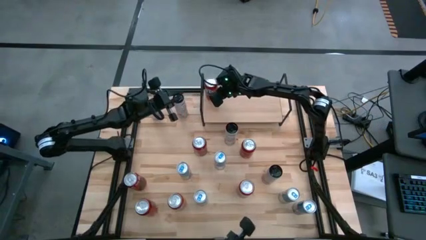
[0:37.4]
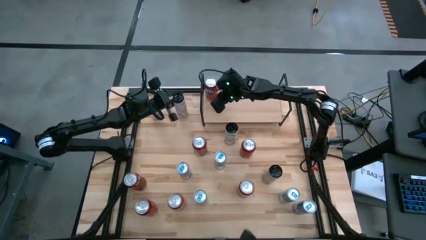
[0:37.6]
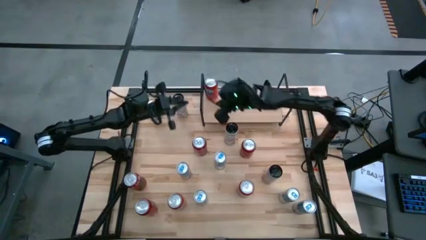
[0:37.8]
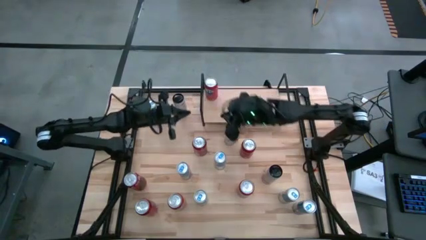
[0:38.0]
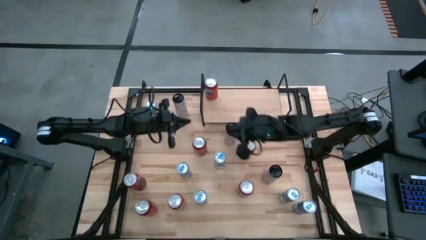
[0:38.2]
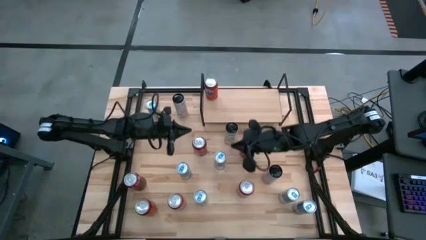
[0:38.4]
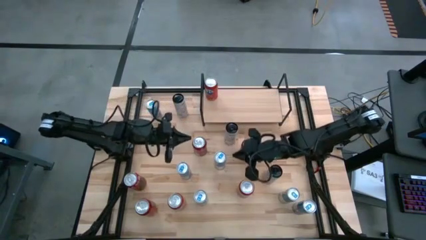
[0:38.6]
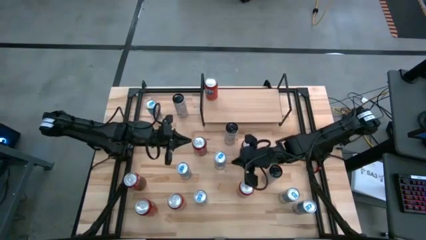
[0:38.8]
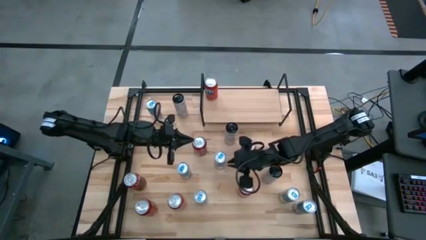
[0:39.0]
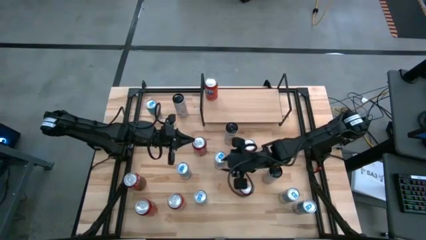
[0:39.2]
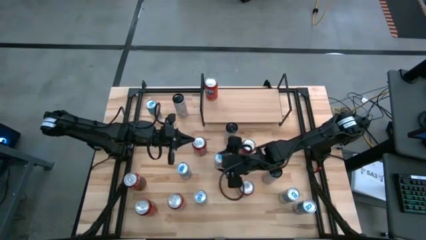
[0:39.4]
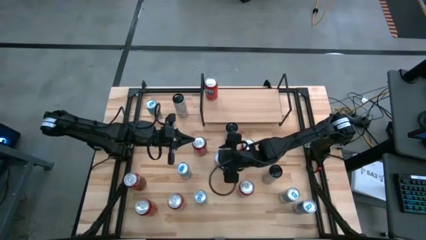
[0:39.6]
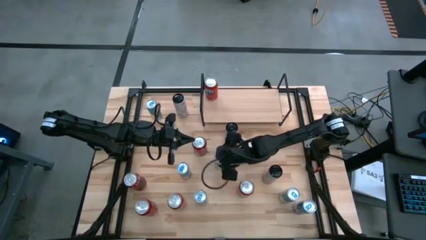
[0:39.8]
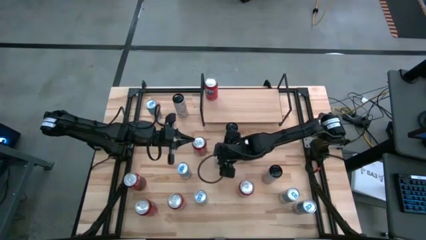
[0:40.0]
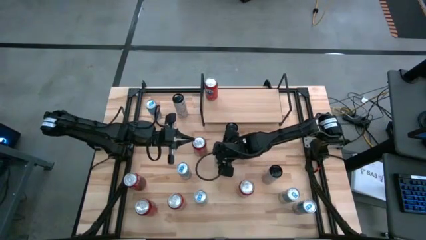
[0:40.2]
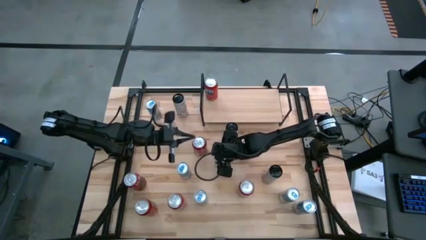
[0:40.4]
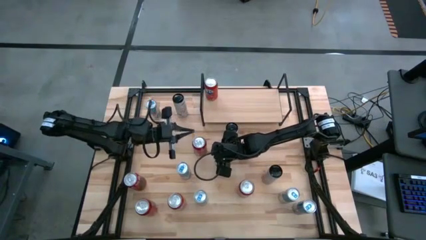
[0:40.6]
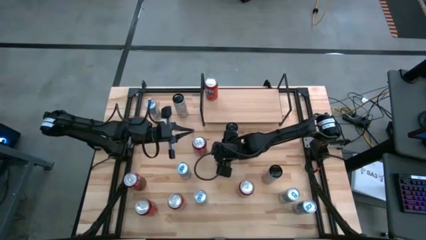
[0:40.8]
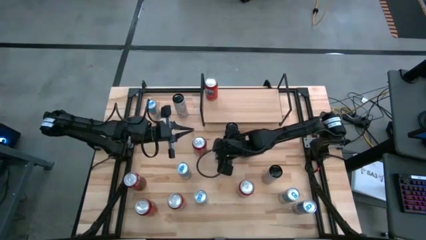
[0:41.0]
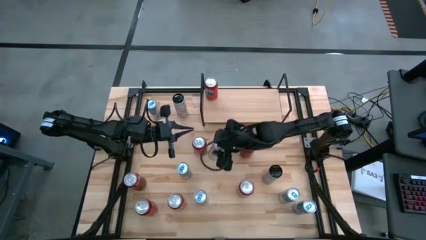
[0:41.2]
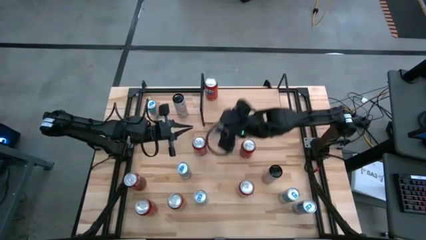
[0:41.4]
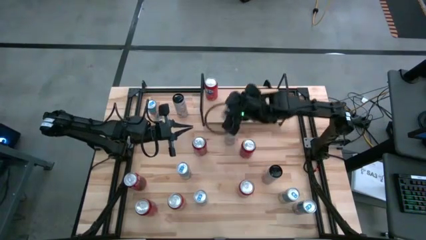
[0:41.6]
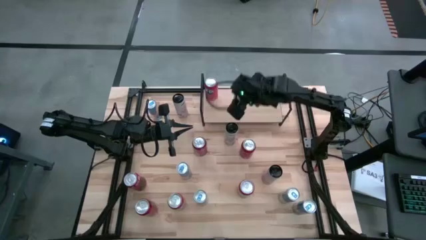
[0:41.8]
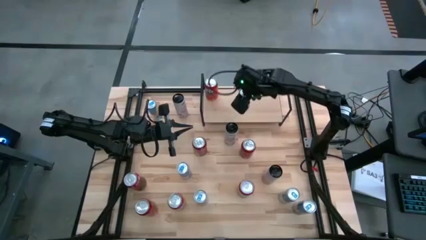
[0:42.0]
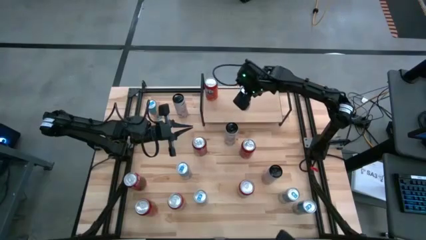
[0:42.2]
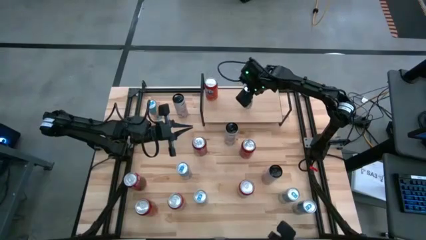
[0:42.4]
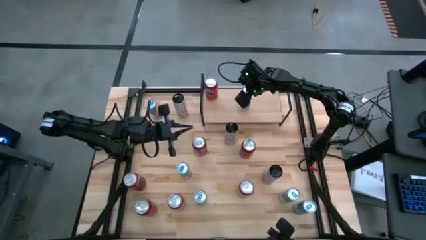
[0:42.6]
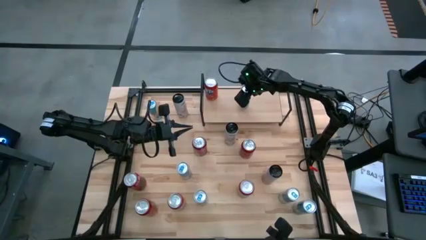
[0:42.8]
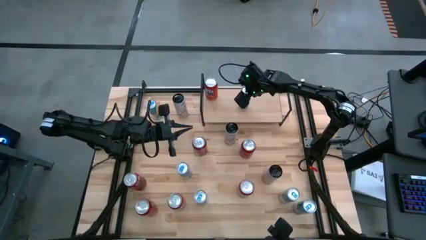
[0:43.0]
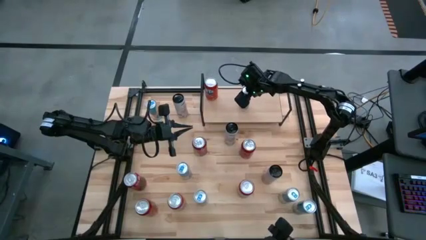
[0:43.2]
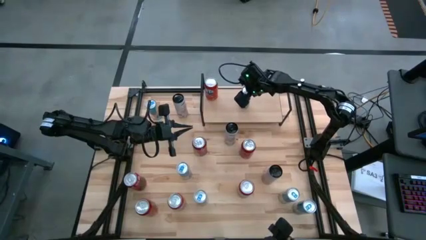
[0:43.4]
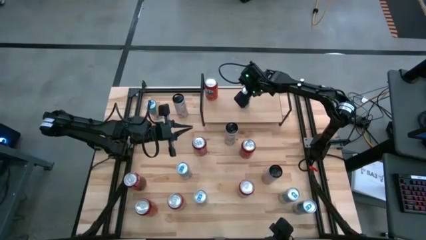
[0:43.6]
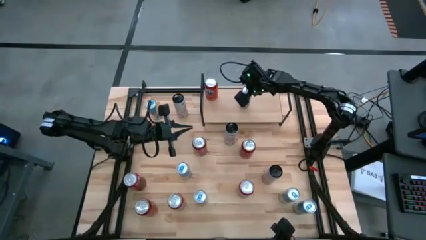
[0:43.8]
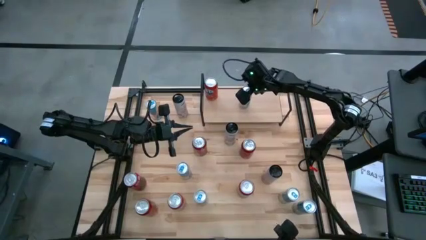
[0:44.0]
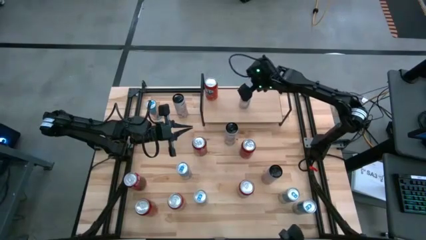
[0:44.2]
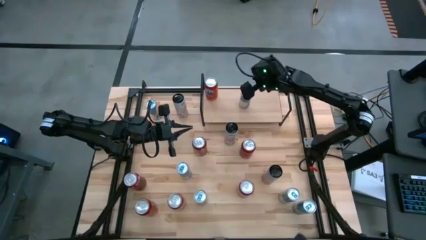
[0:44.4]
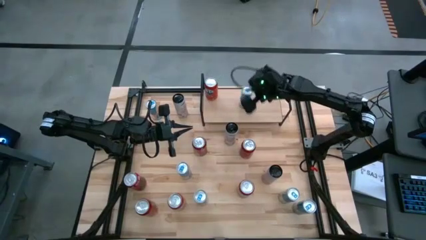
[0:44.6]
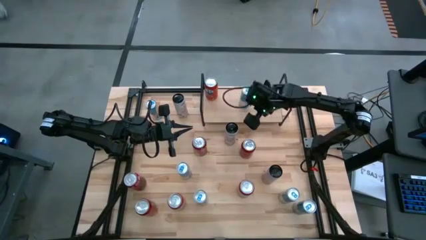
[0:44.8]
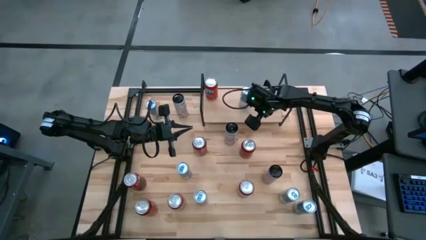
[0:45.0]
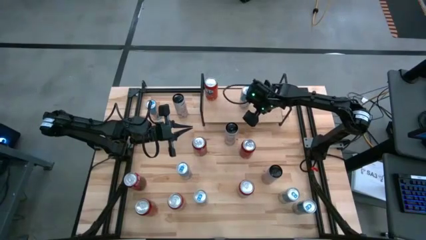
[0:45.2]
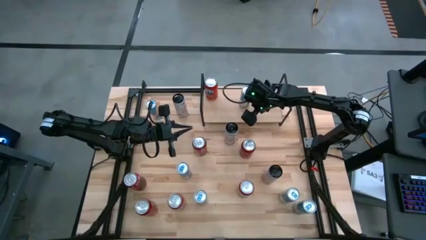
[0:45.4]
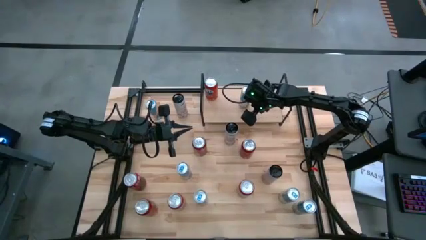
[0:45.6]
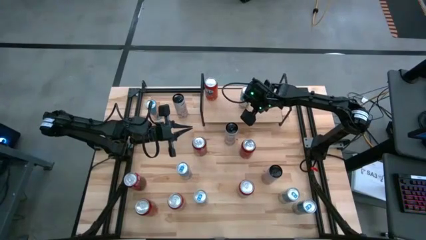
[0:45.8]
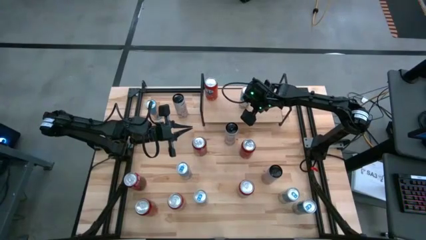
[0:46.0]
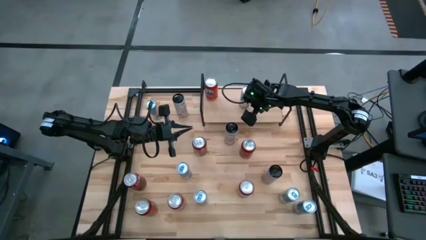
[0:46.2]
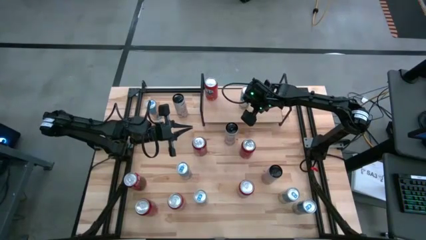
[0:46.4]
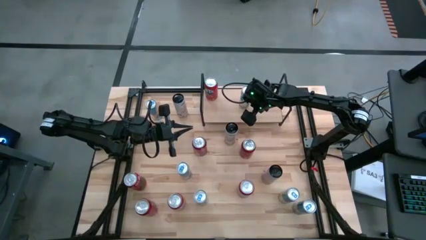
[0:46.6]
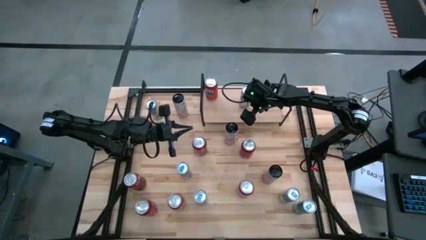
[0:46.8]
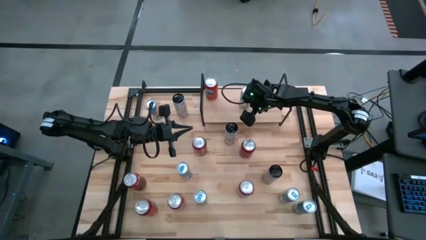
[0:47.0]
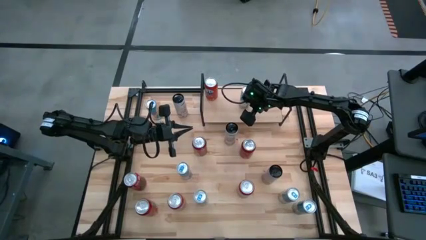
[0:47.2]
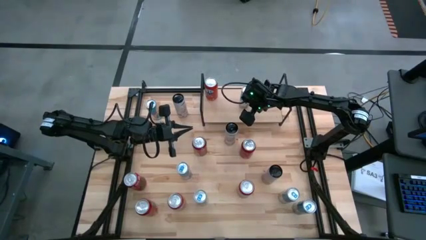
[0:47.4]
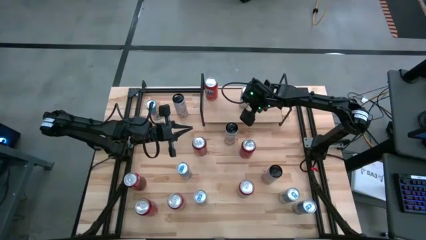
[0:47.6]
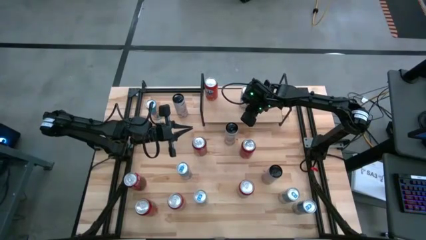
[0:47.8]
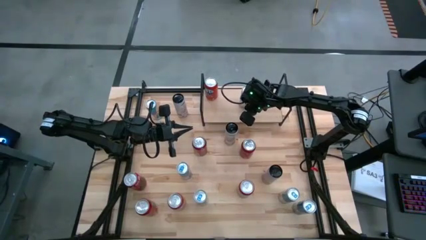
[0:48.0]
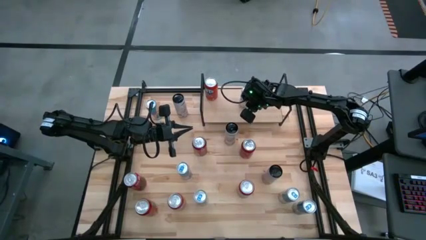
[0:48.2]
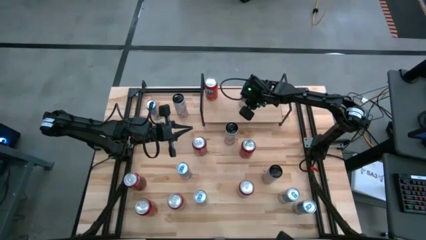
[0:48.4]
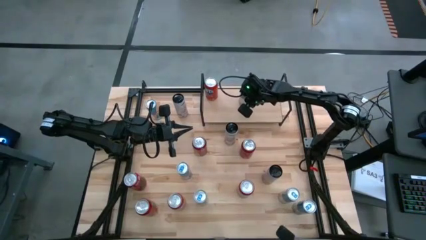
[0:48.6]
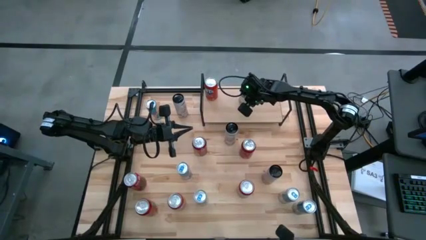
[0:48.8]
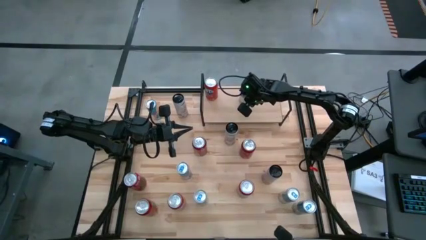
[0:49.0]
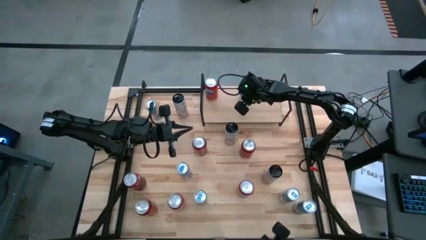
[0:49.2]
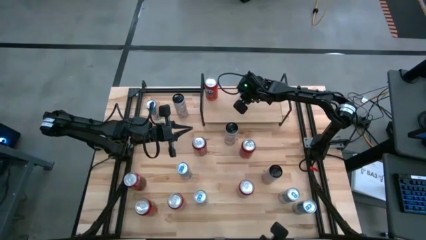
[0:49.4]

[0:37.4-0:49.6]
Task: Place canned beverage on shelf
Put the blue soda can on the shelf

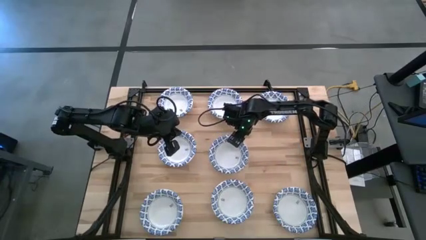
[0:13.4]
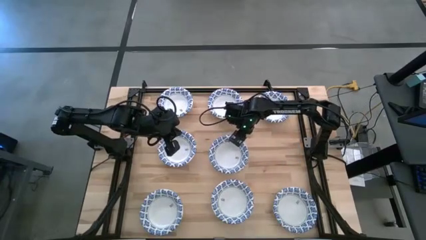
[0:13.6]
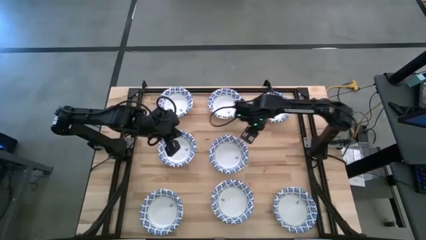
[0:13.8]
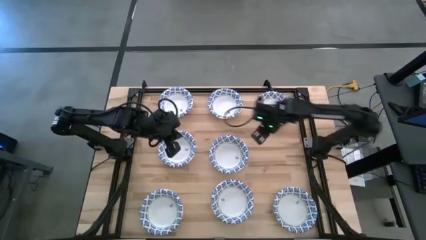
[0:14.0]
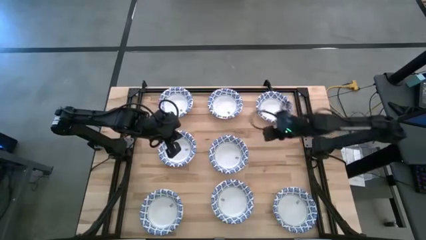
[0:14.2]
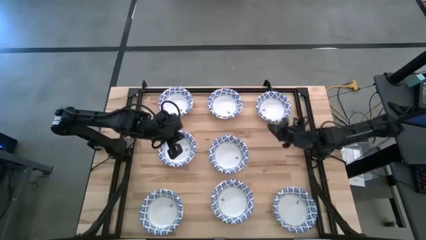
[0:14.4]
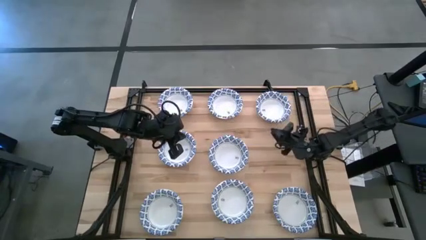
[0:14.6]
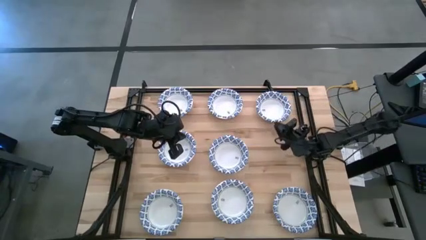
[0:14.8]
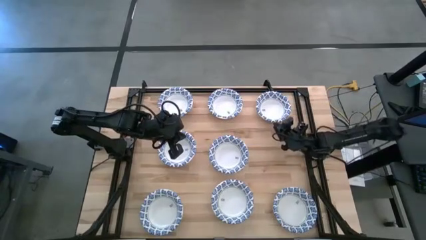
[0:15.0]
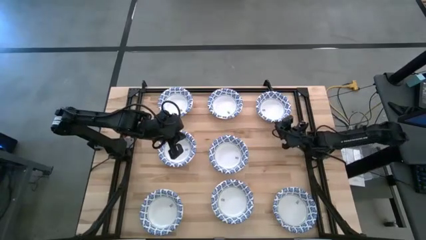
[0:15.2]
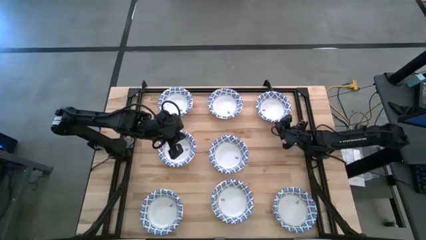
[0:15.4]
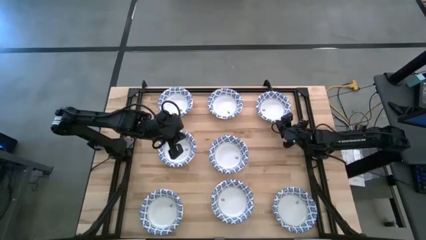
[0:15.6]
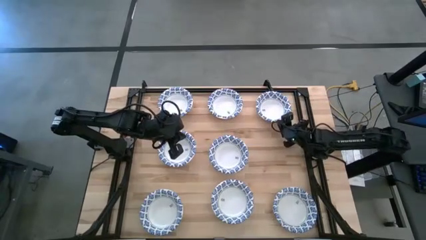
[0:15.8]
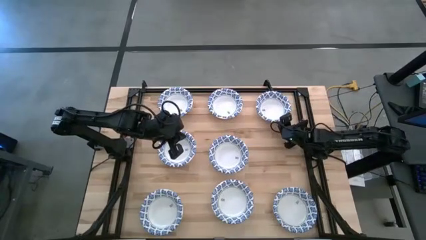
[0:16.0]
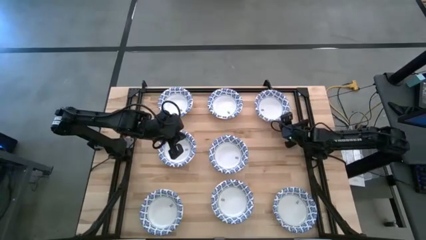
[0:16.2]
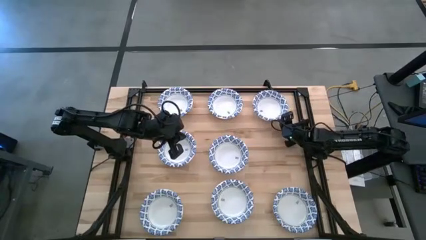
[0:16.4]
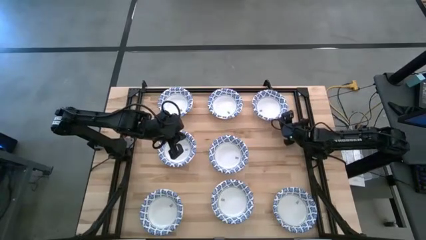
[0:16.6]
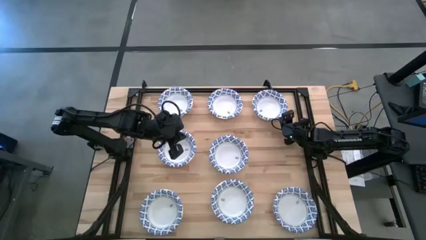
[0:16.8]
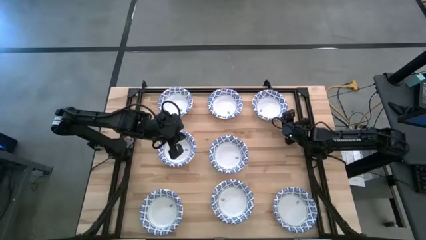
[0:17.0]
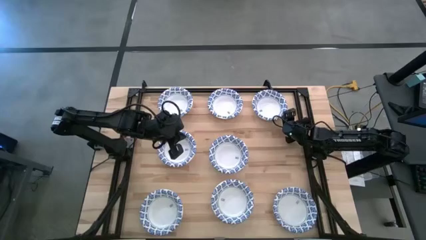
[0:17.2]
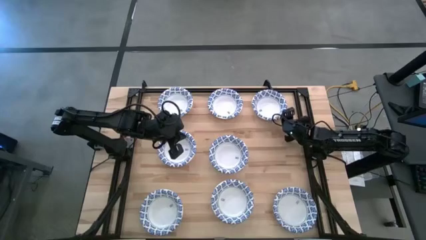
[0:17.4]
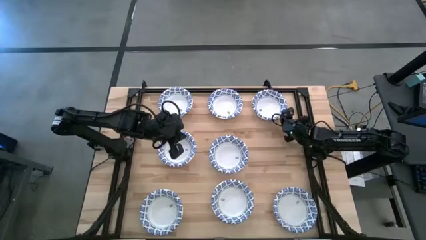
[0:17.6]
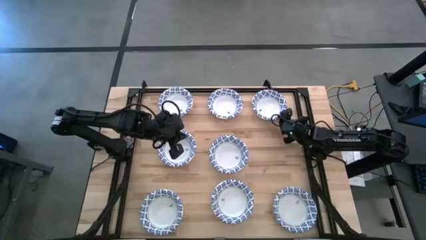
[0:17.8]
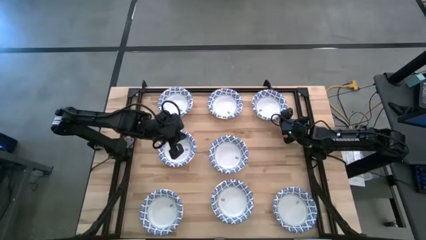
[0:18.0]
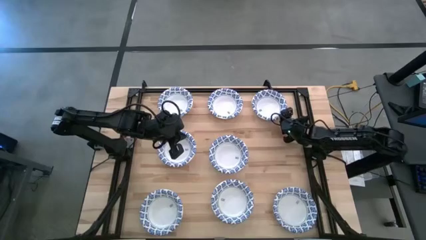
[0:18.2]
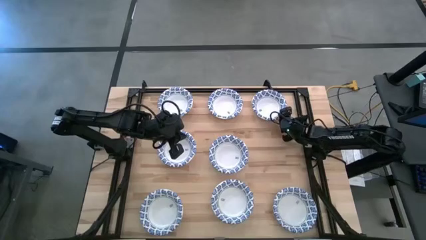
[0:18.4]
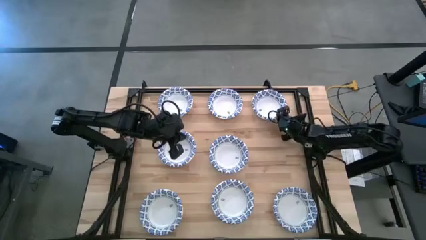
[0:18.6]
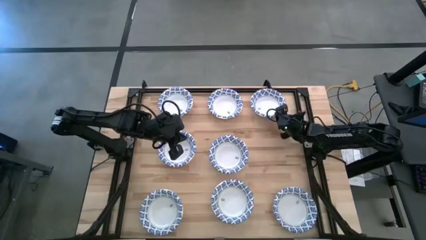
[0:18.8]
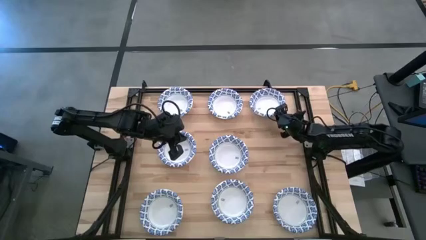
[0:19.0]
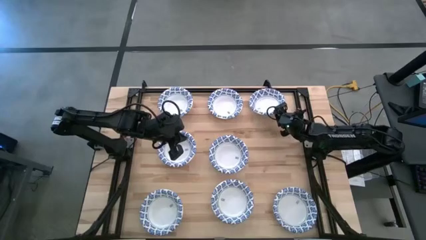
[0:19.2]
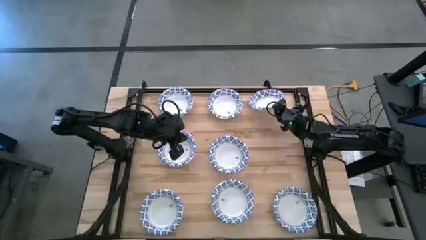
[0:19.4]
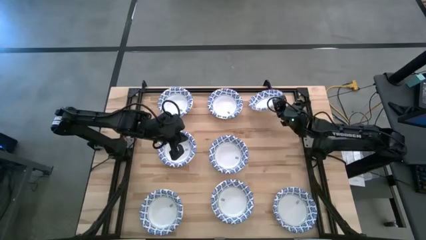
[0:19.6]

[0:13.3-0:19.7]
Task: Nest bowls inside each other
Stack the white patterned bowl on top of the center white patterned bowl
